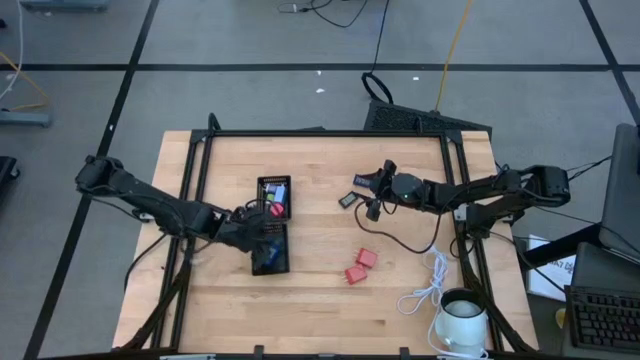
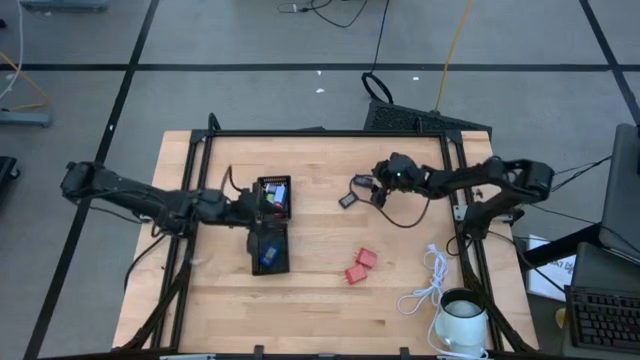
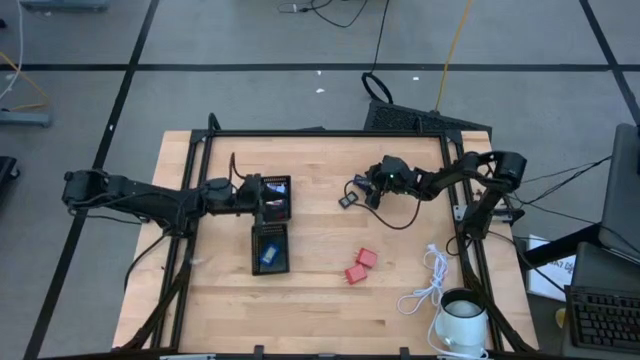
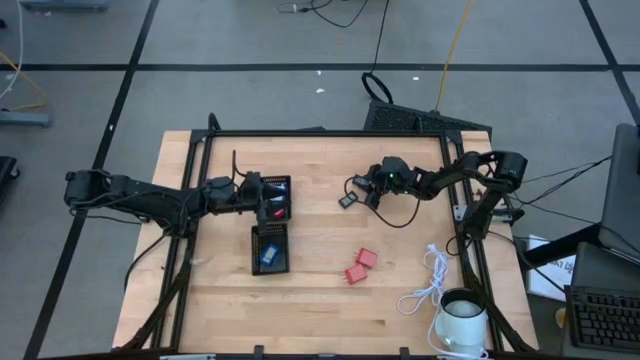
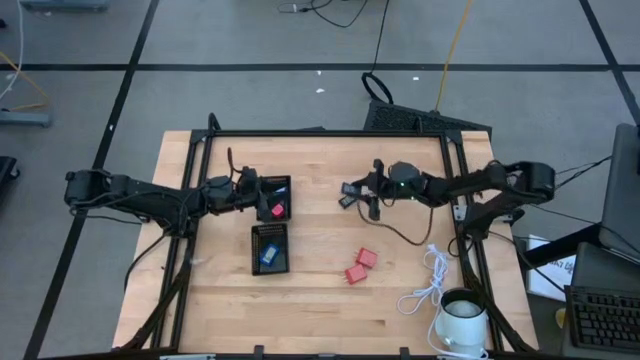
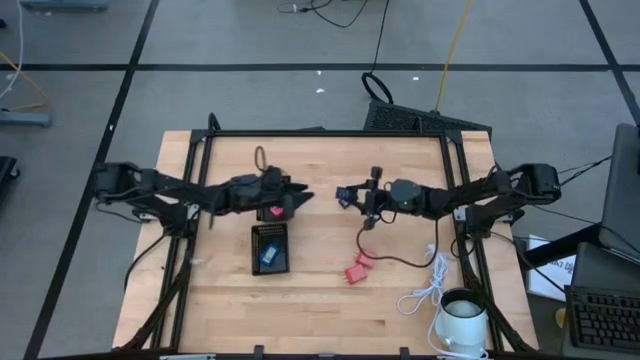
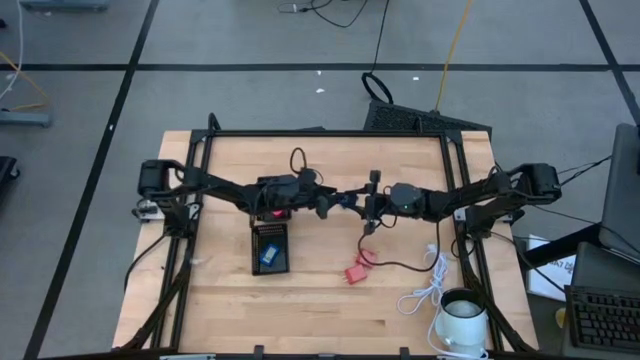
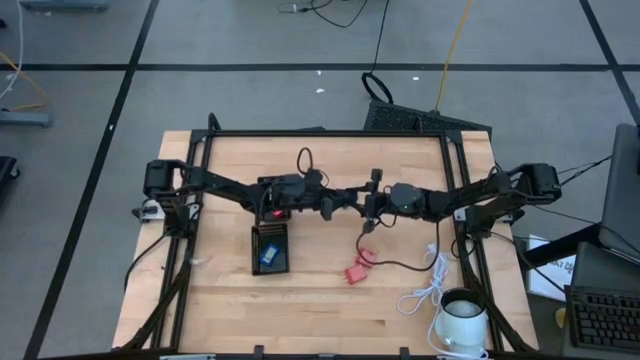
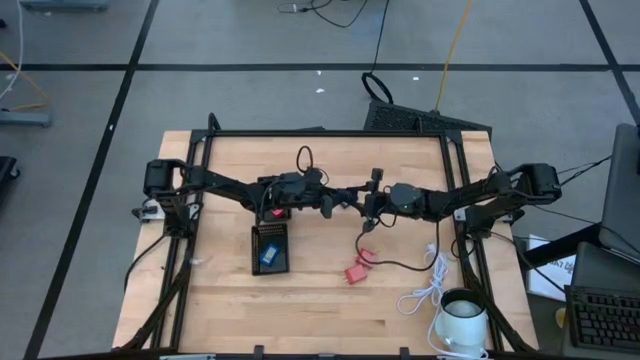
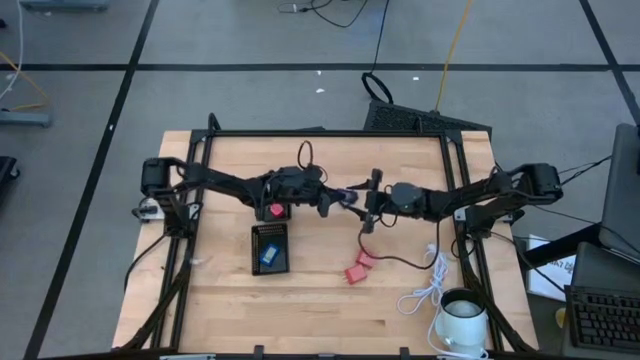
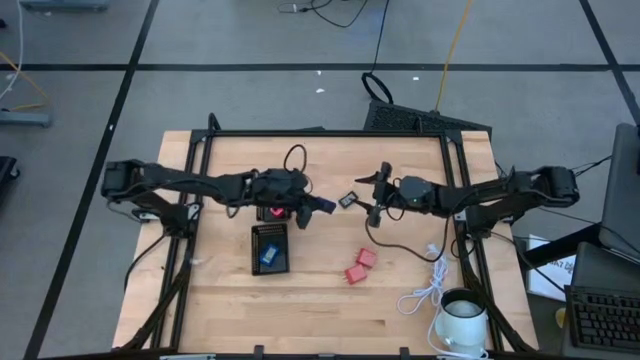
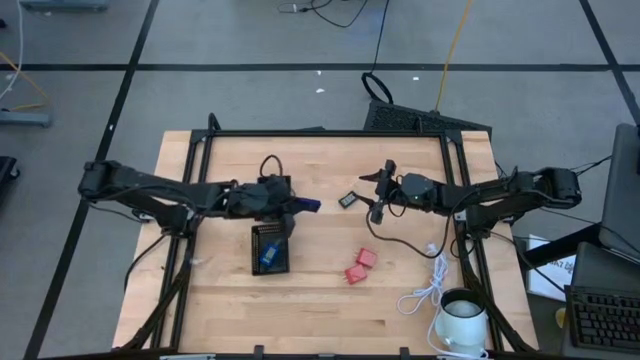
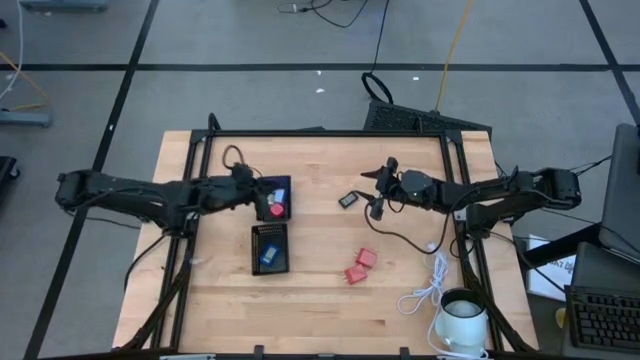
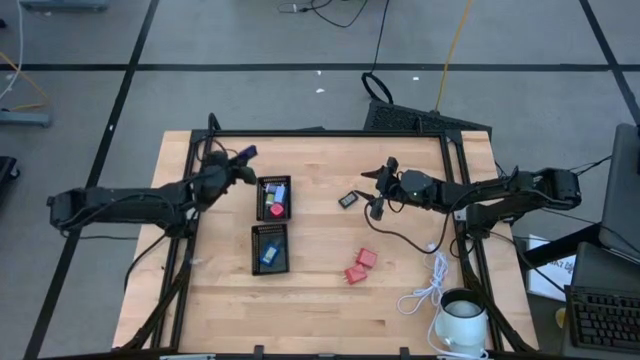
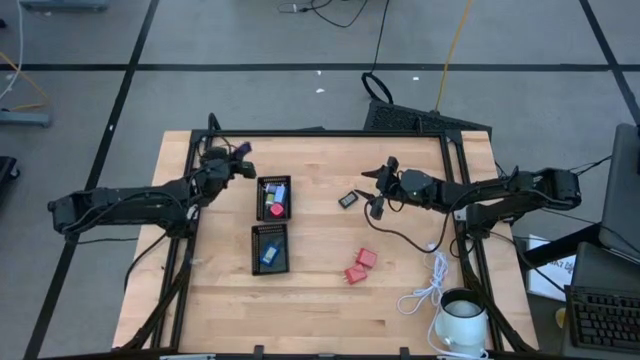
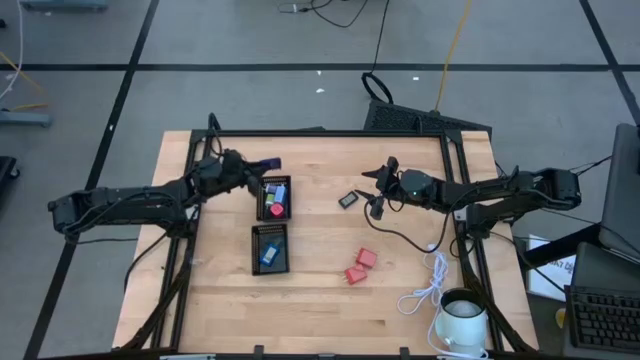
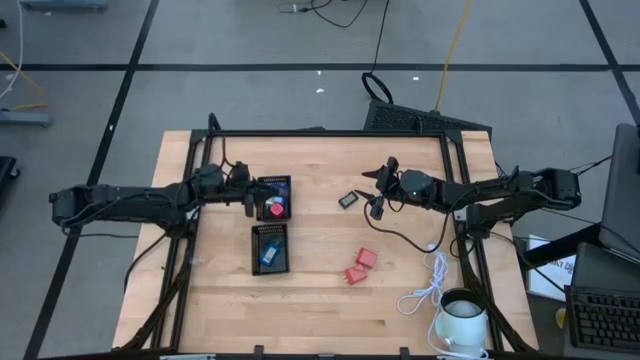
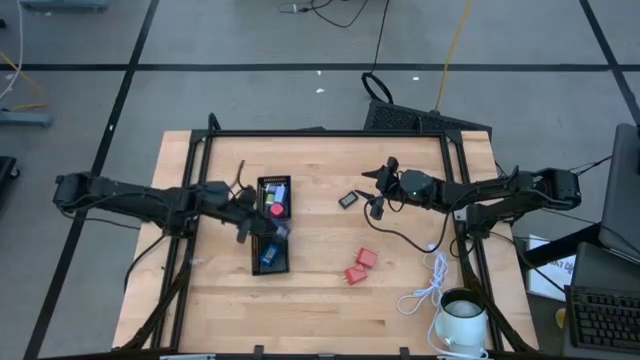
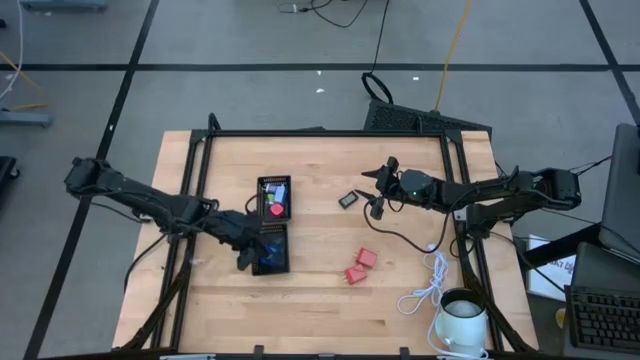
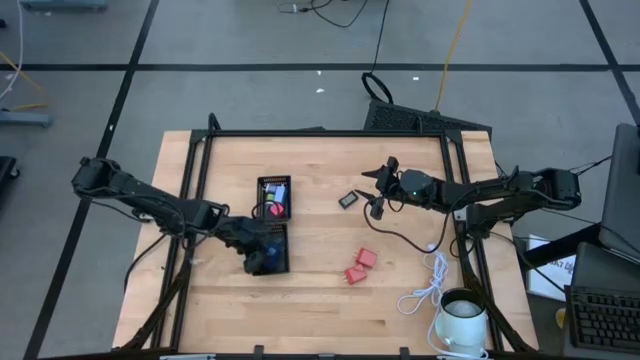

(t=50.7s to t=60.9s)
Task: Pick & Place Office items
Put the dark blue timer into the bottom black bin

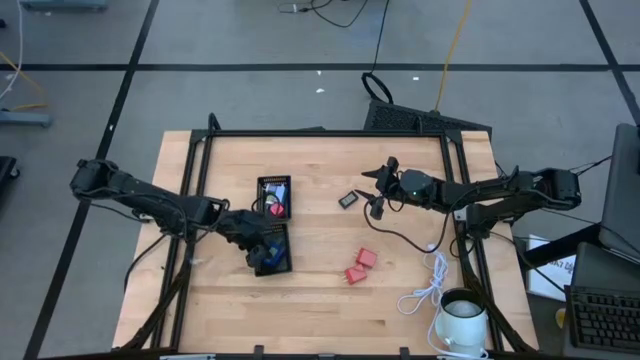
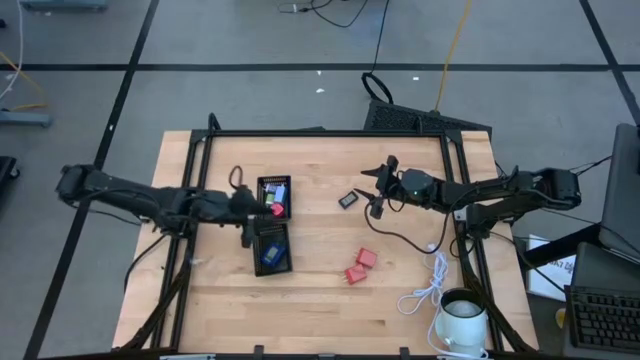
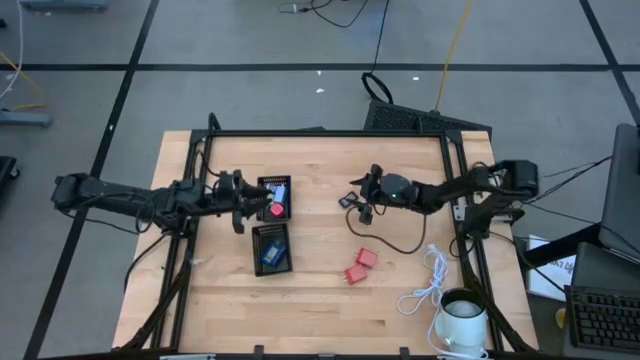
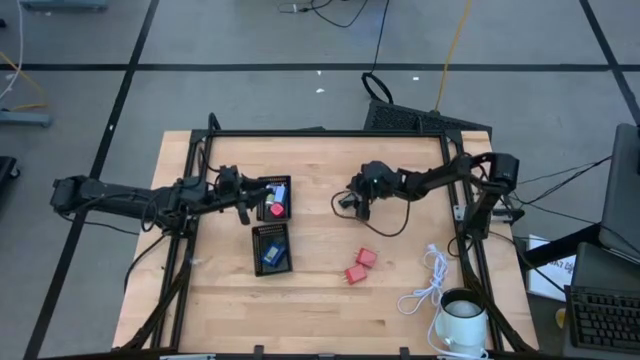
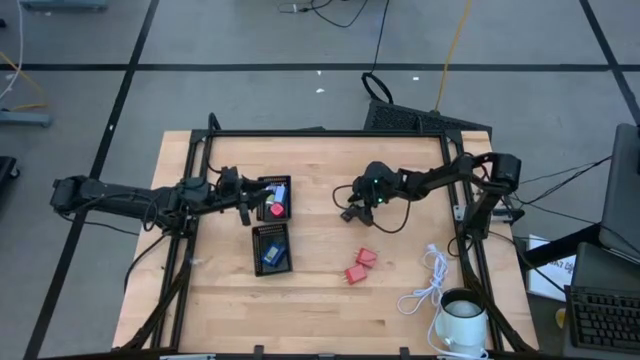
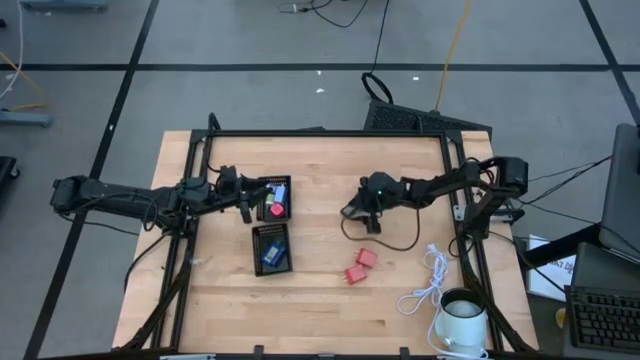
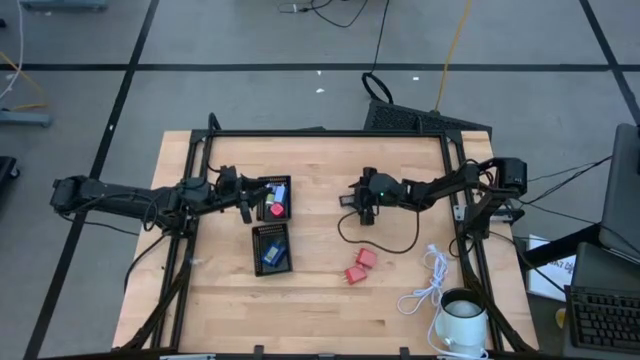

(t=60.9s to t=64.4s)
Put the black timer into the bottom black bin

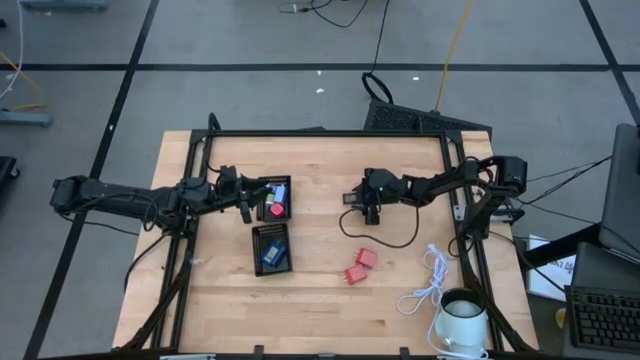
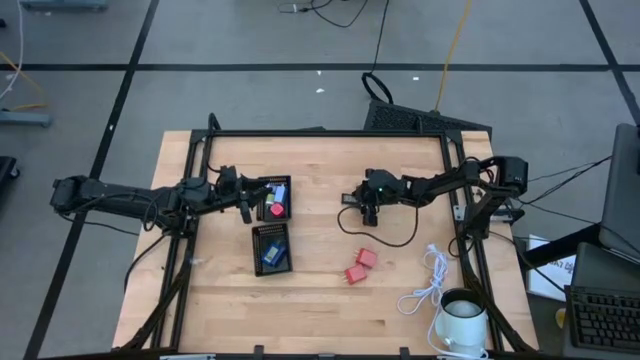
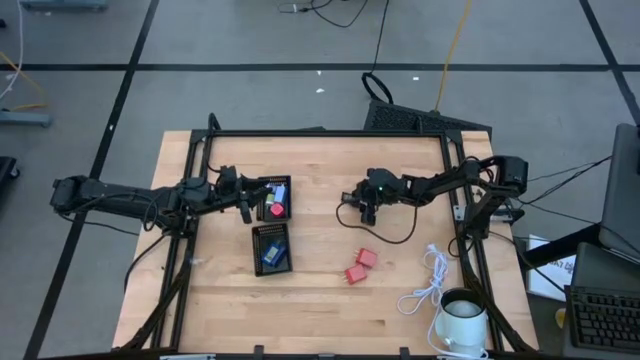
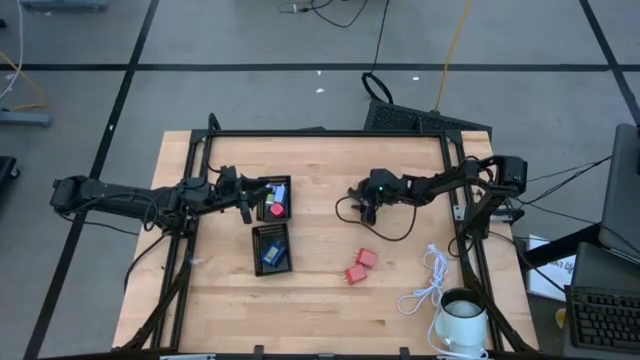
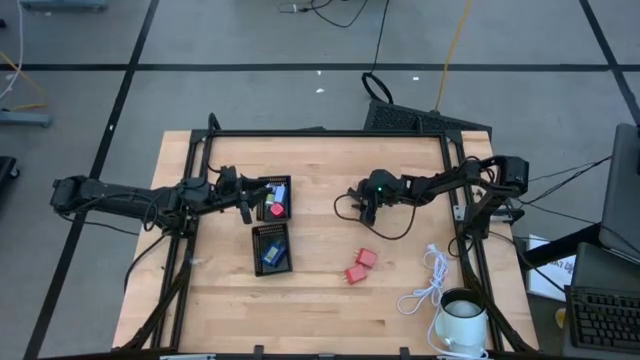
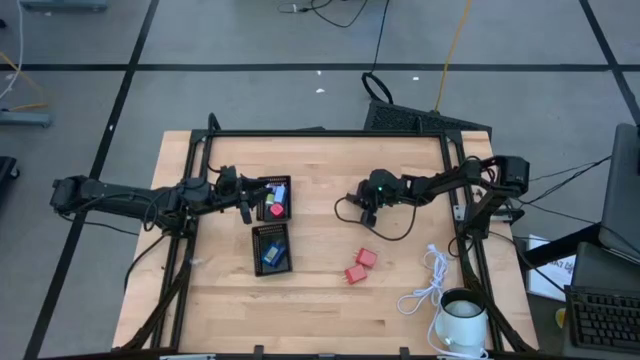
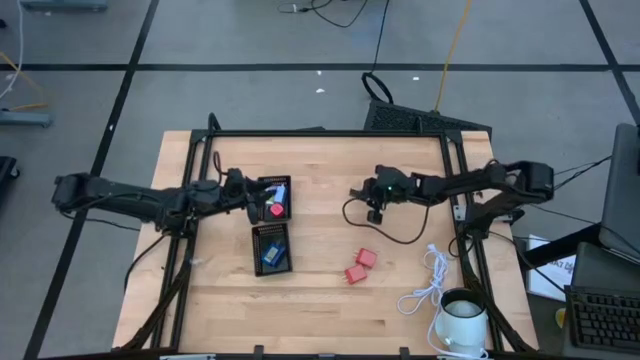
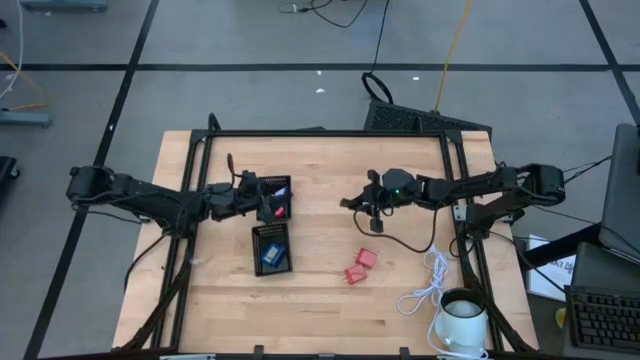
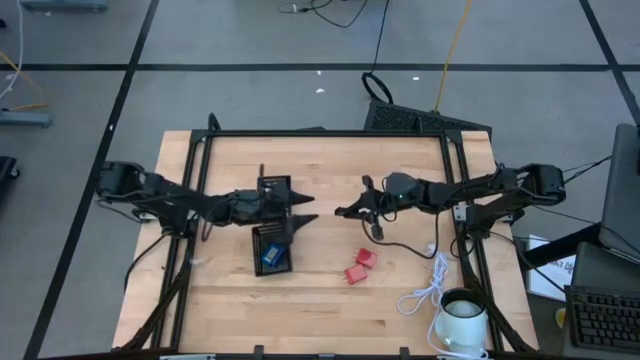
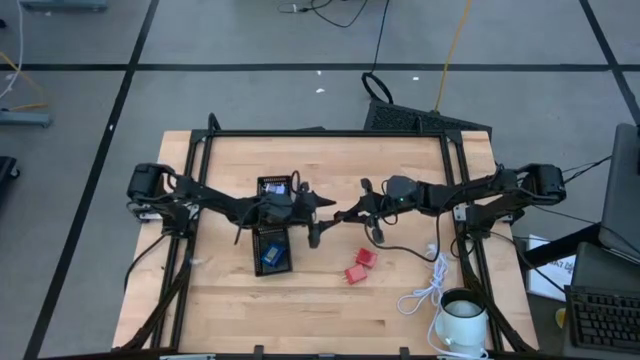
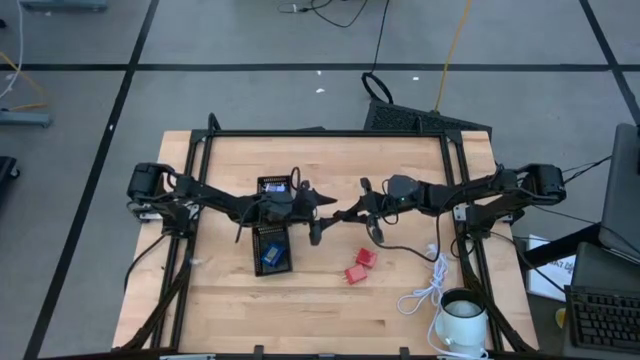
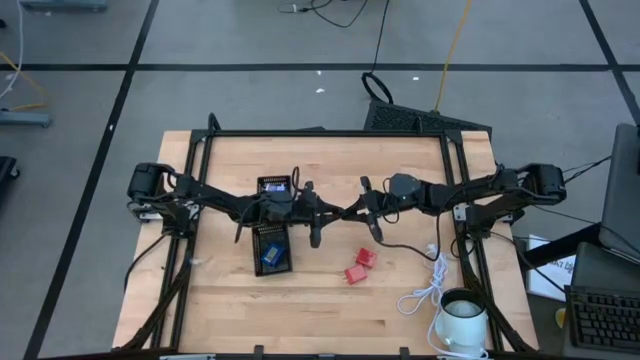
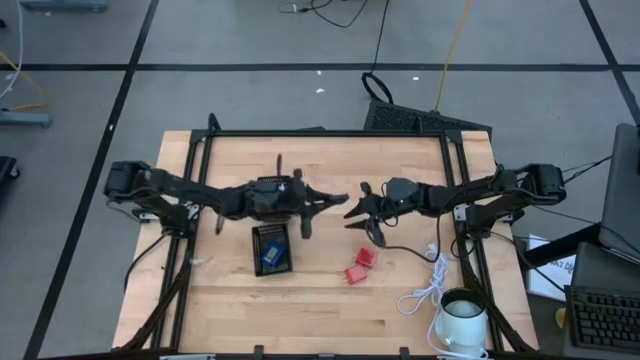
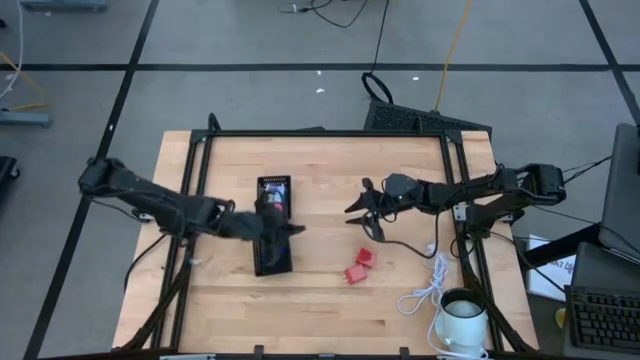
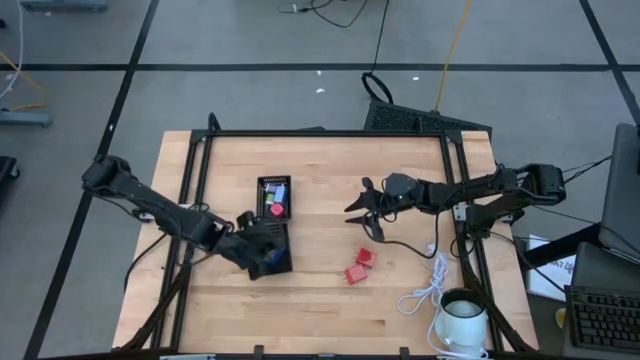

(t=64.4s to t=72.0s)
Put the black timer into the bottom black bin
